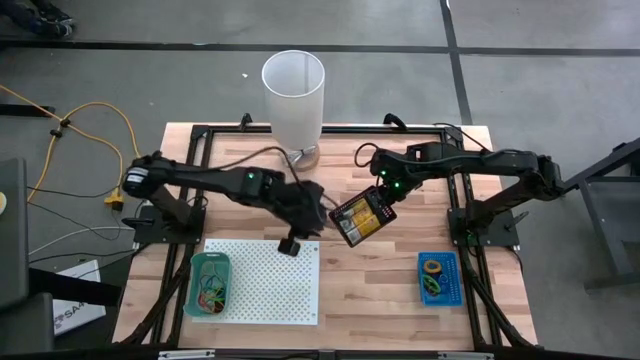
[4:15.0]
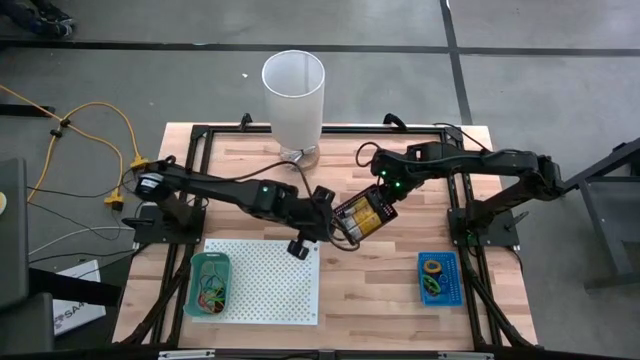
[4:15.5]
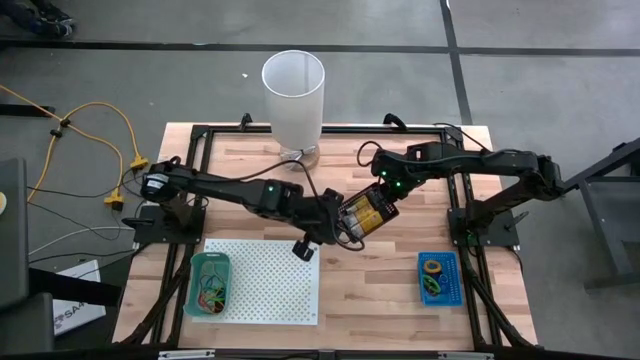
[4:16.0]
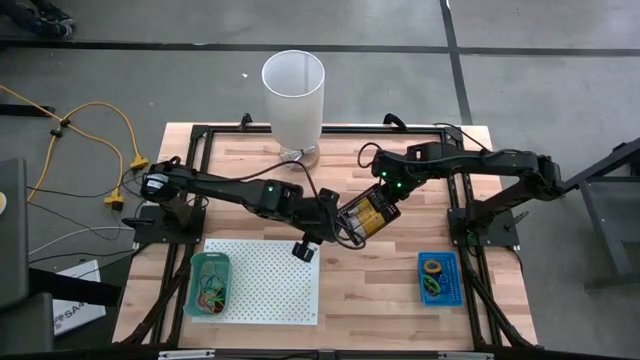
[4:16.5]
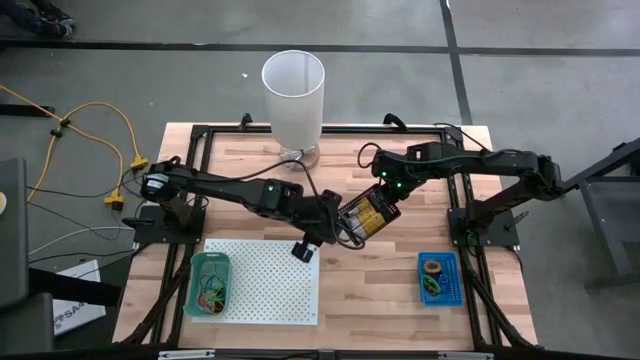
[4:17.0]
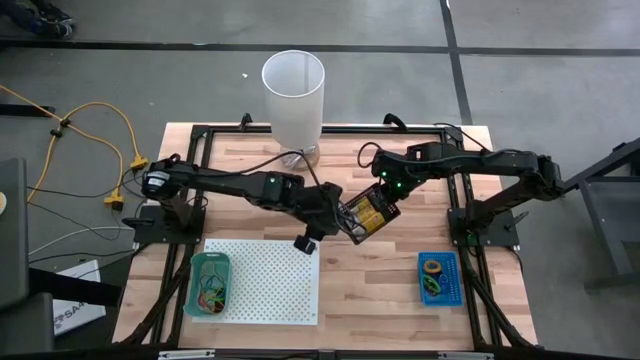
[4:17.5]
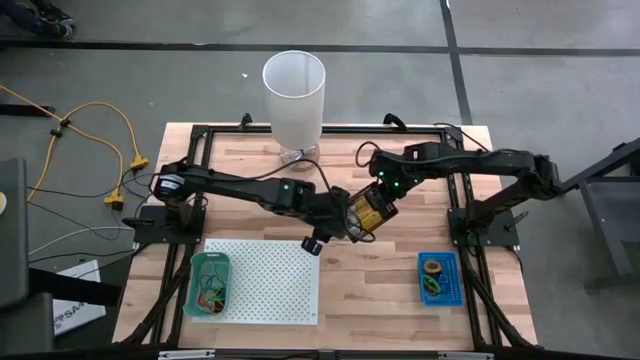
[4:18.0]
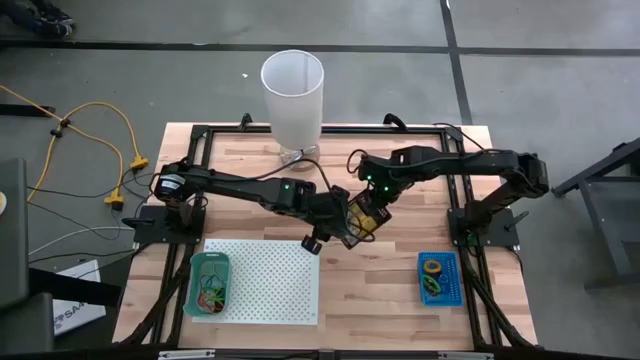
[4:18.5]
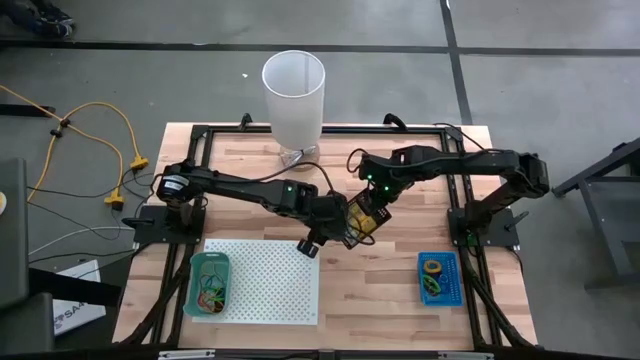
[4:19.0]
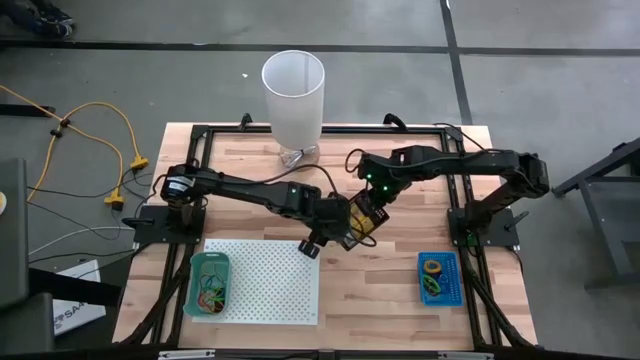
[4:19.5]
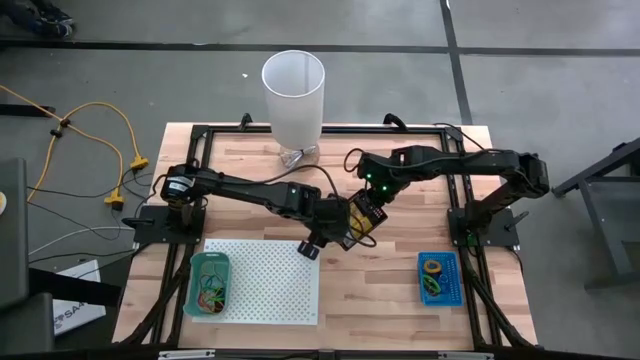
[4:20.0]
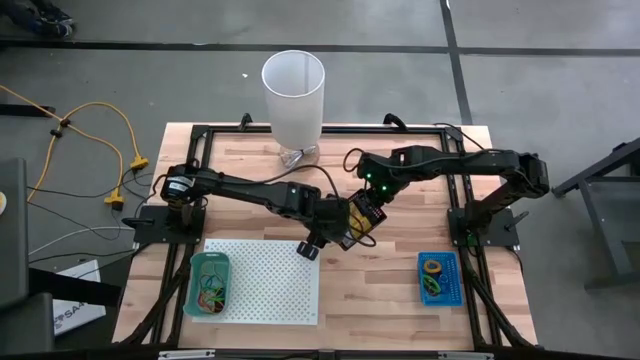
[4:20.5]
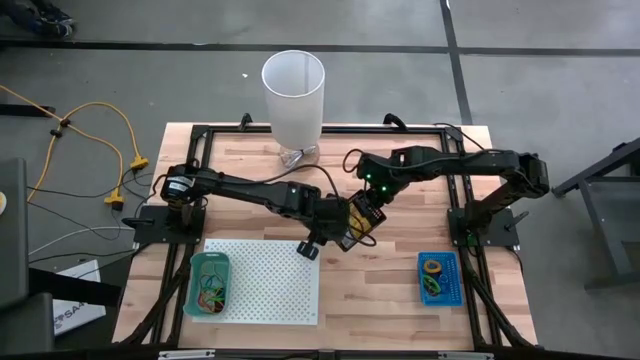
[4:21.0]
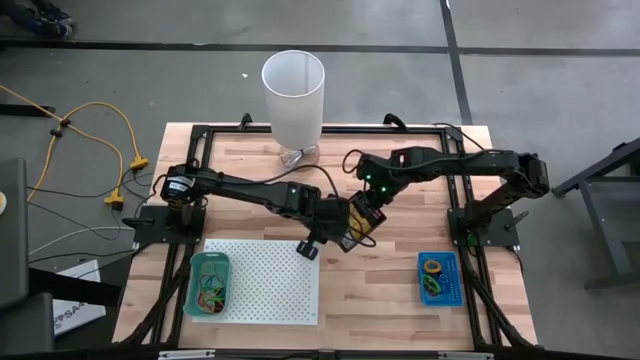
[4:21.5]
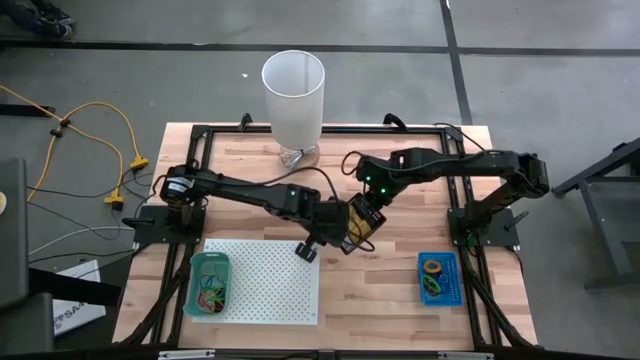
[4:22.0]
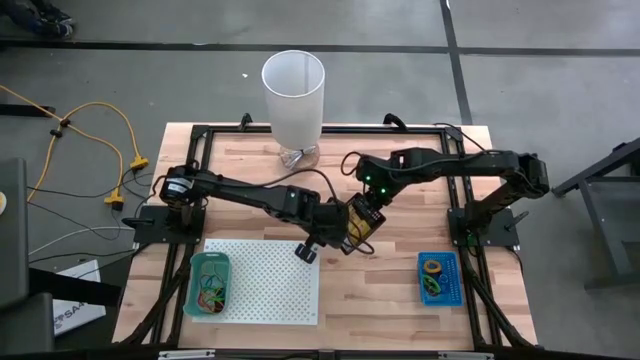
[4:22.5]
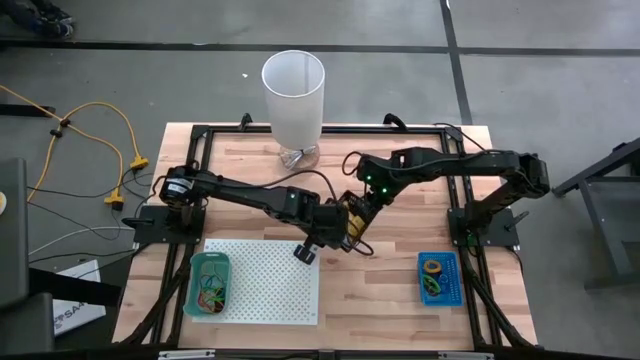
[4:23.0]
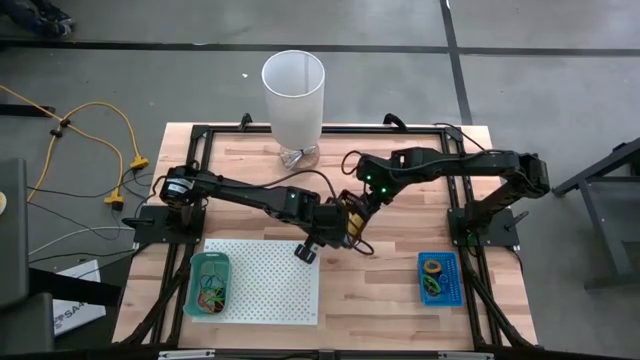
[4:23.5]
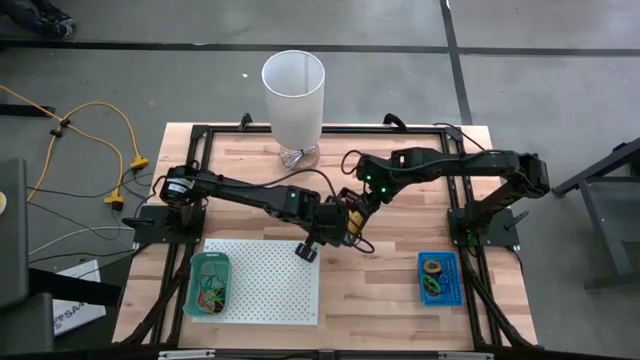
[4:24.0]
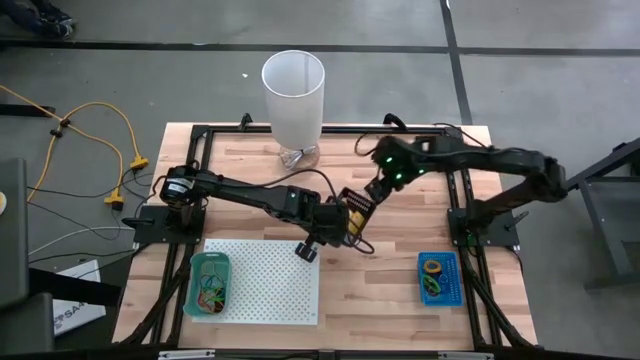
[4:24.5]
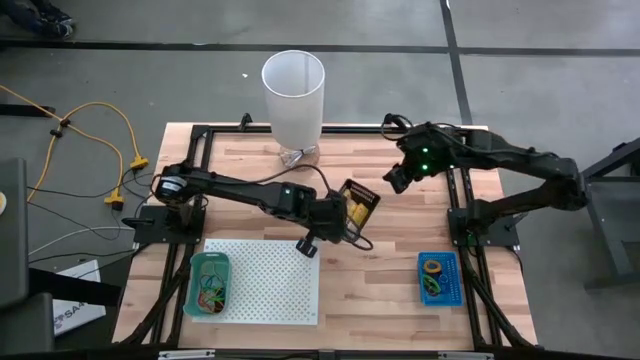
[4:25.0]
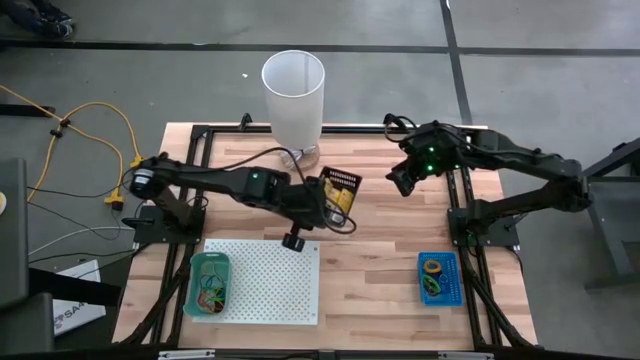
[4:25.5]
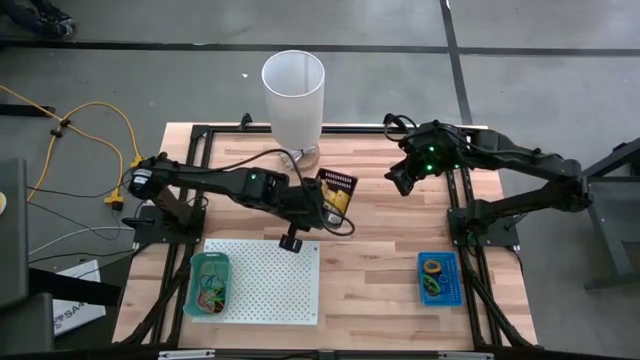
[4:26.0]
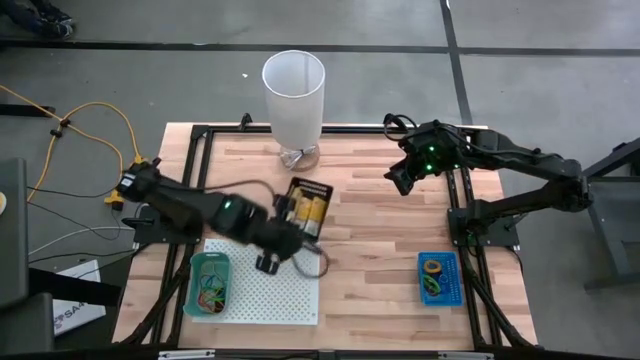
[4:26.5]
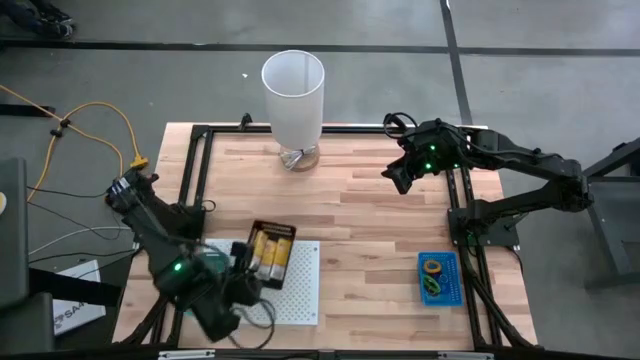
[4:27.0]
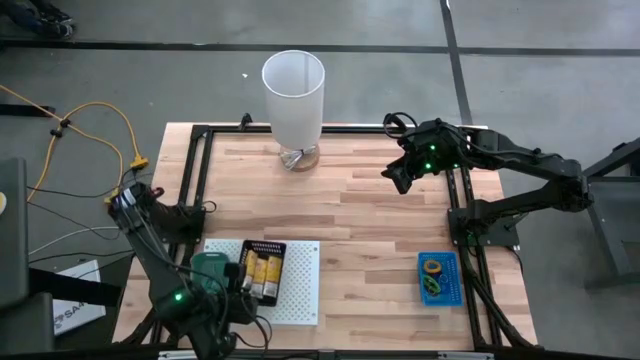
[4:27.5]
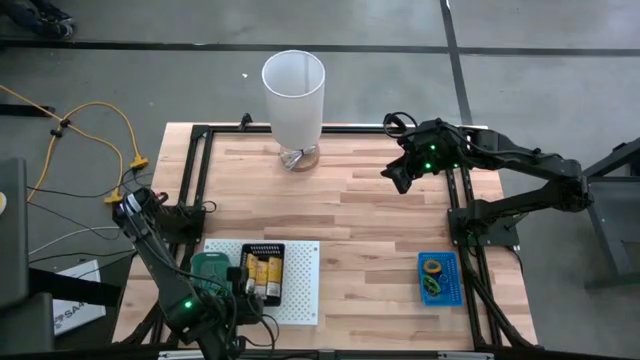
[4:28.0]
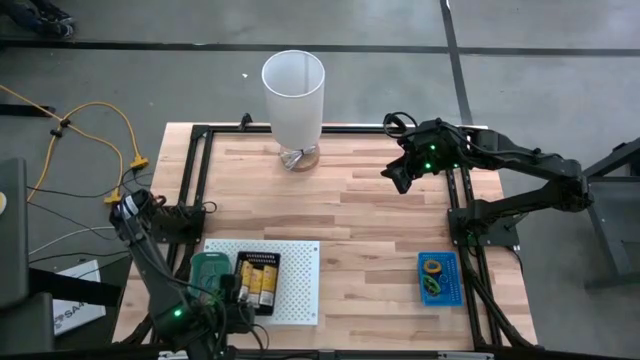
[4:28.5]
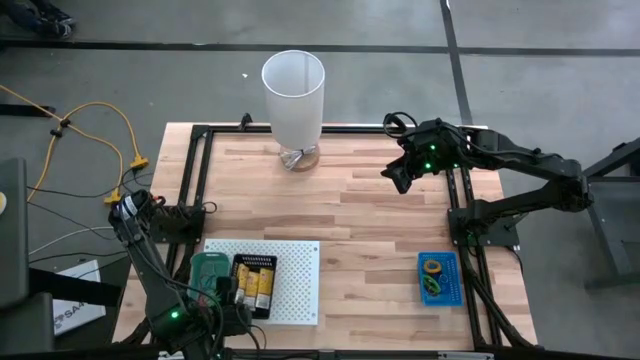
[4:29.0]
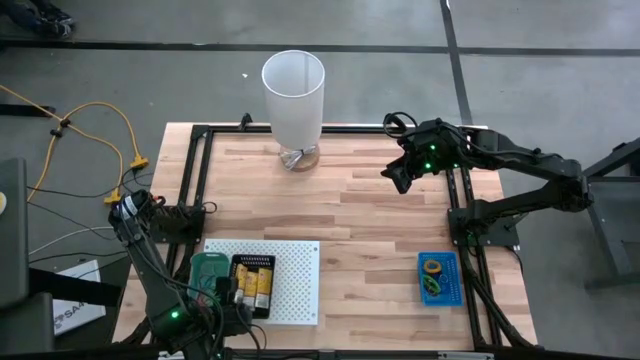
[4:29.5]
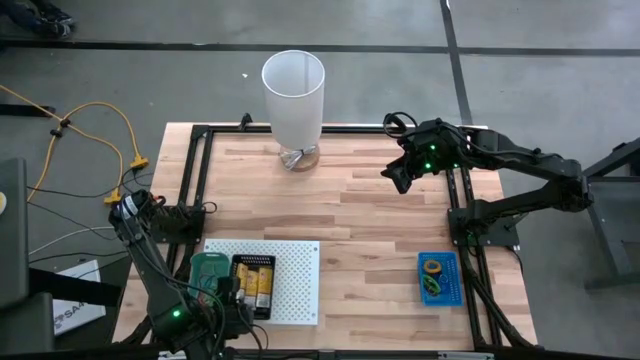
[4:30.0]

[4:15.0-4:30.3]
Task: Pick & Place Office Desk Supplies
Put the black bin on the shelf

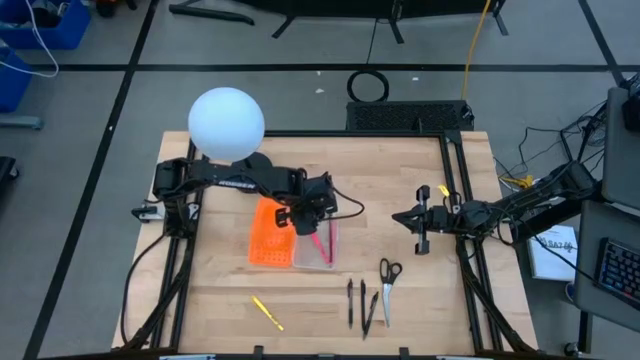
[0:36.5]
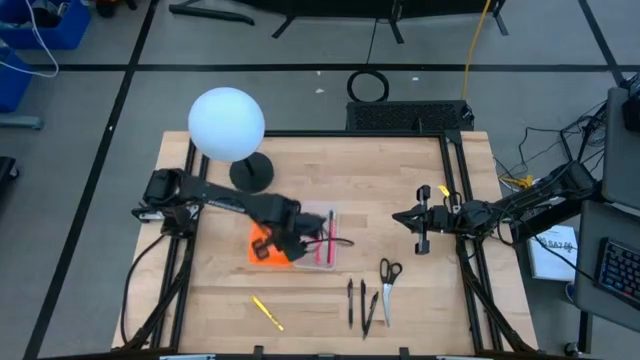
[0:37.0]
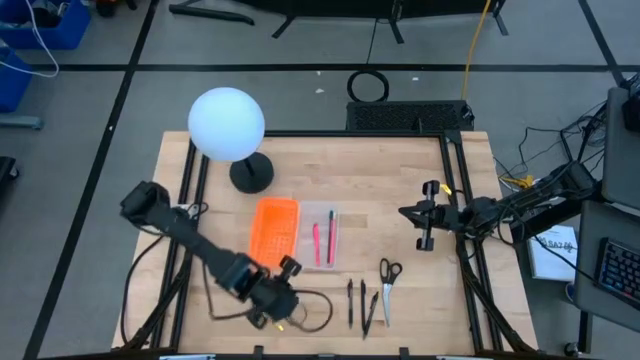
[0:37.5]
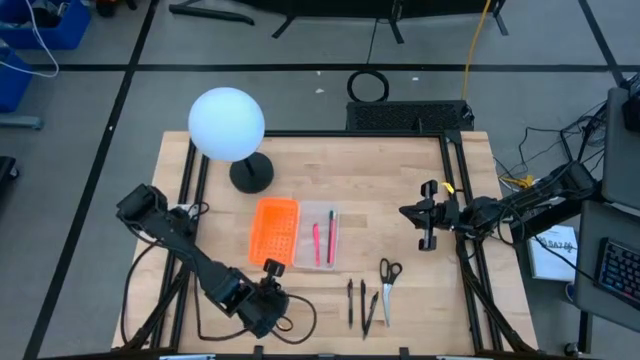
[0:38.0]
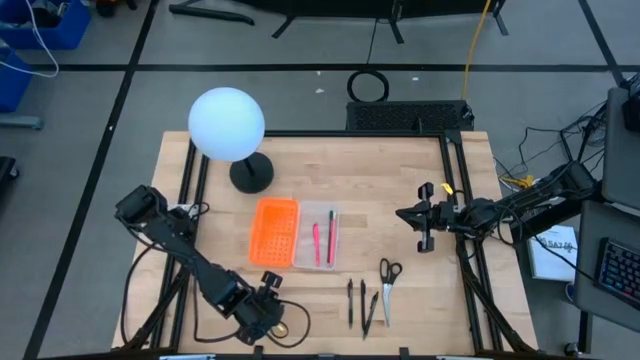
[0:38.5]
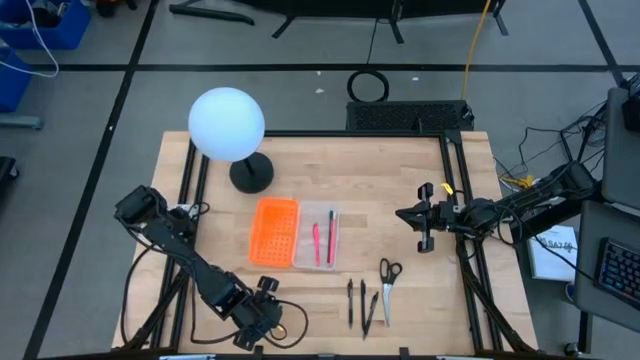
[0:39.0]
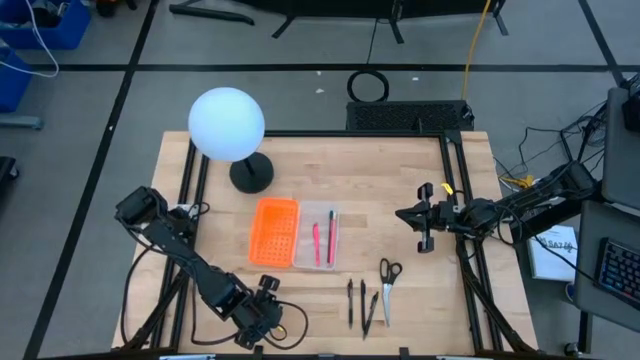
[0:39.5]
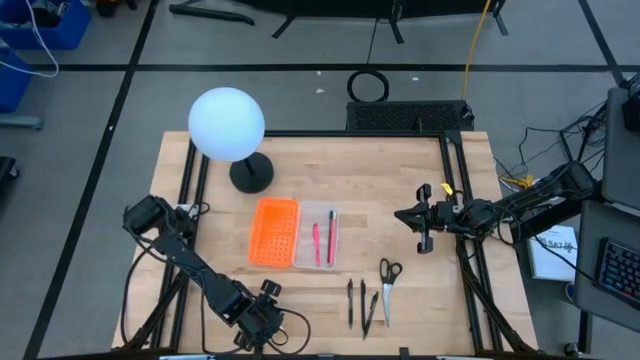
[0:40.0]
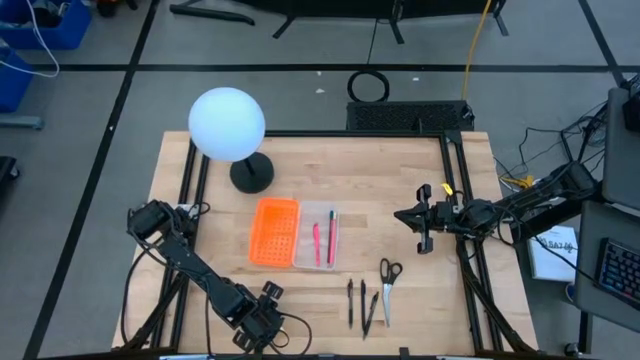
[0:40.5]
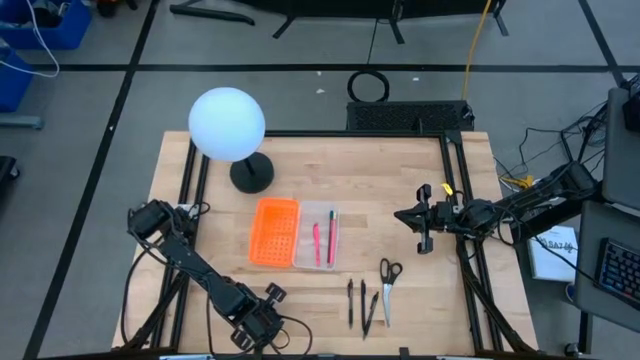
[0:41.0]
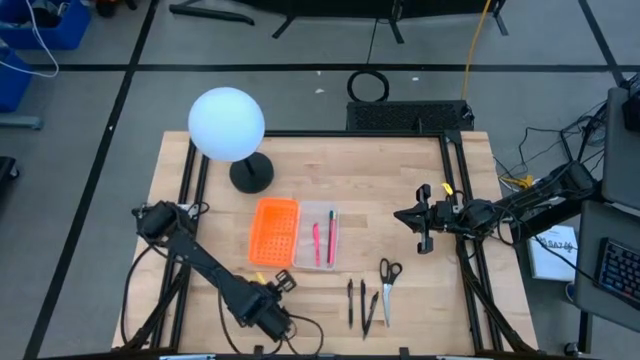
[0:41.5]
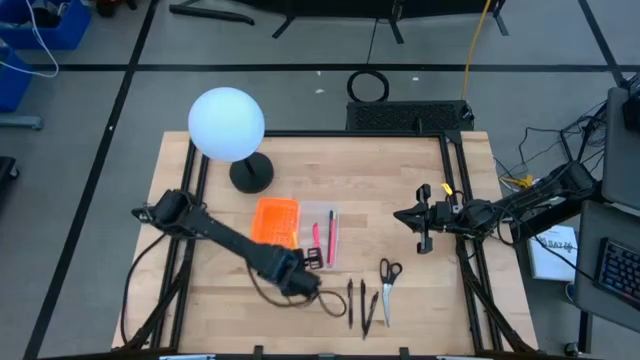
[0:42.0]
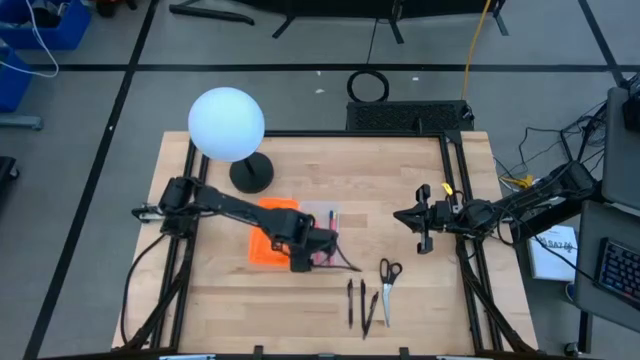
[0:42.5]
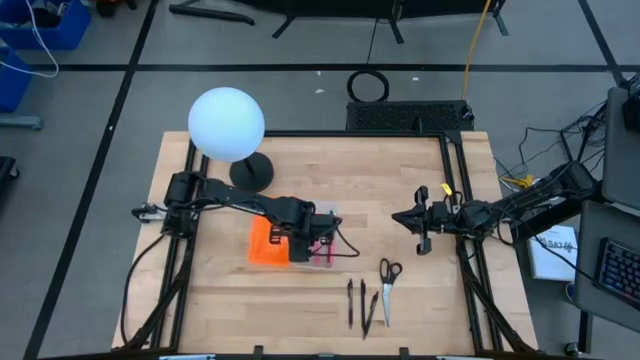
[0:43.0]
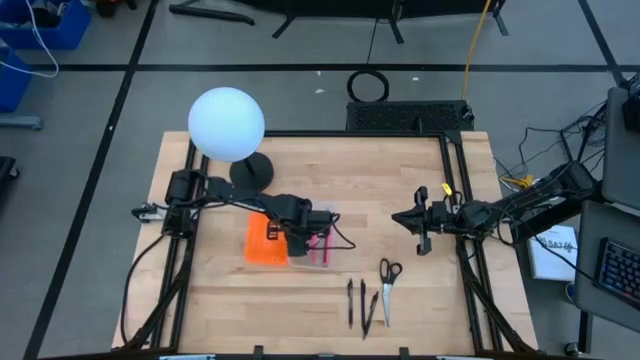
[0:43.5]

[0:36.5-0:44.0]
Task: Pick & place school supplies into a supply box
Put the yellow pen into the supply box
